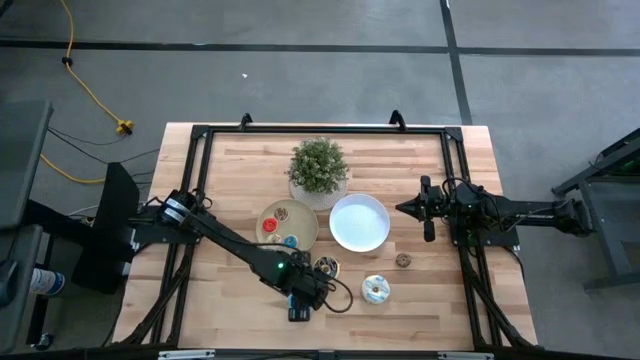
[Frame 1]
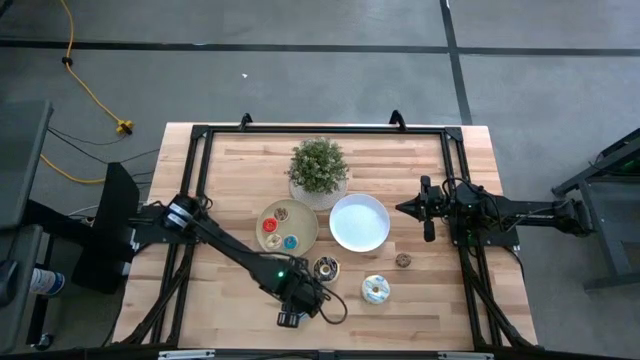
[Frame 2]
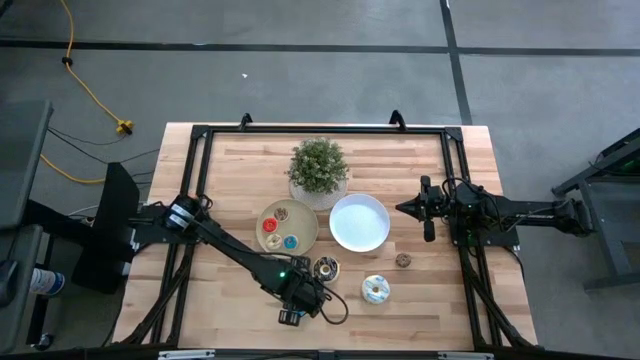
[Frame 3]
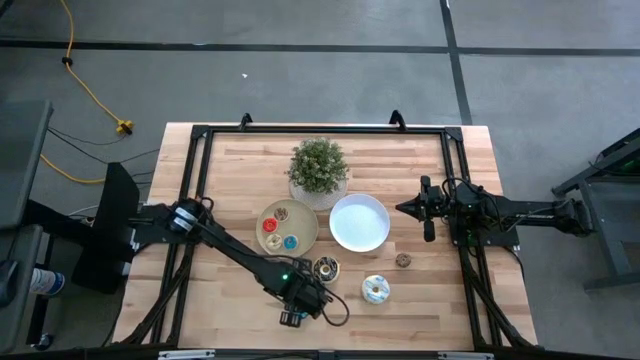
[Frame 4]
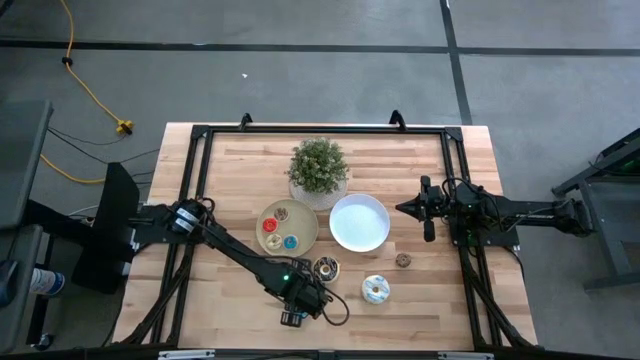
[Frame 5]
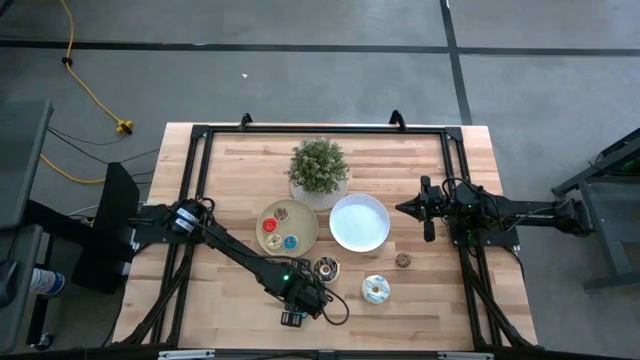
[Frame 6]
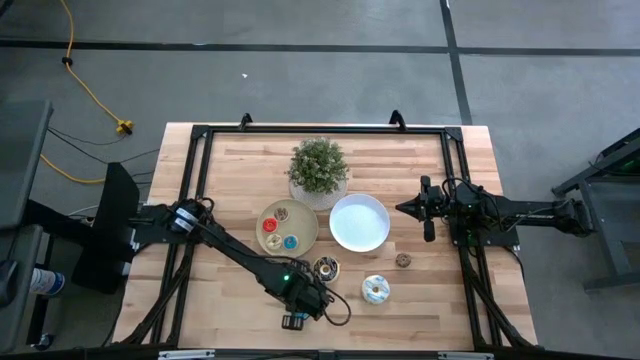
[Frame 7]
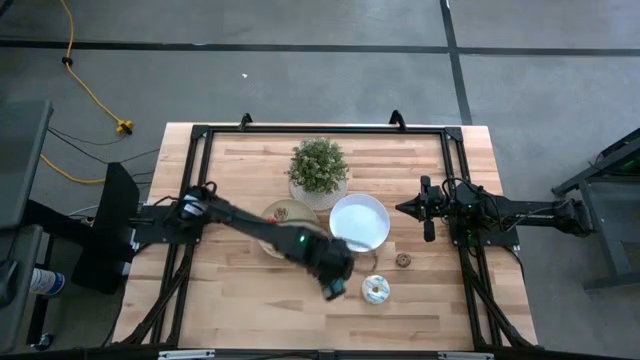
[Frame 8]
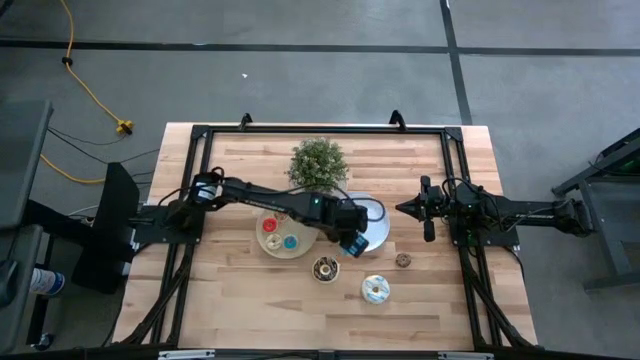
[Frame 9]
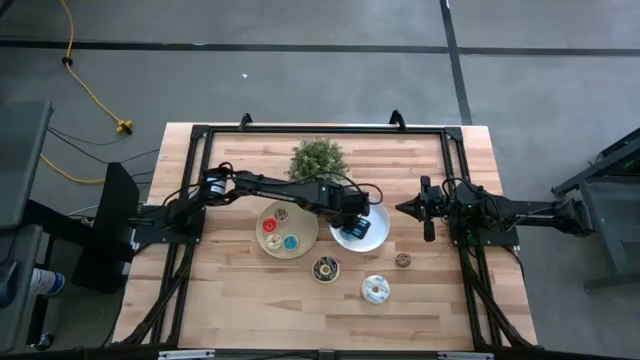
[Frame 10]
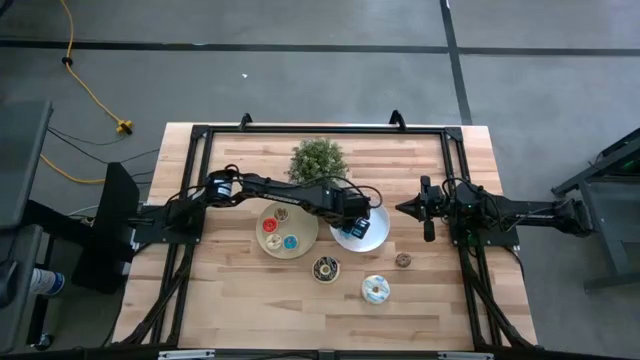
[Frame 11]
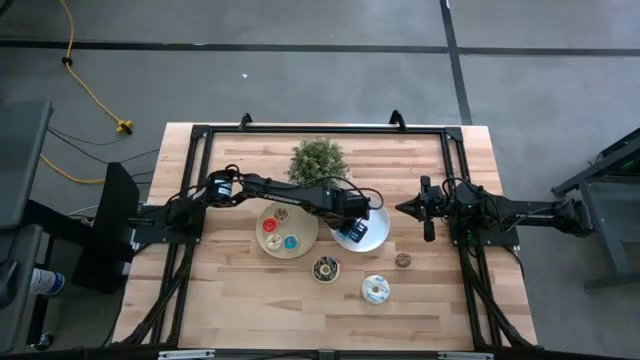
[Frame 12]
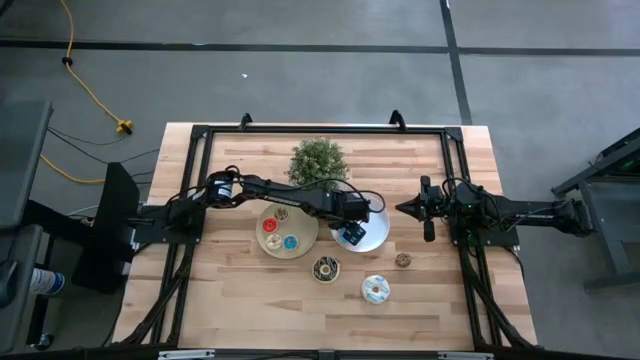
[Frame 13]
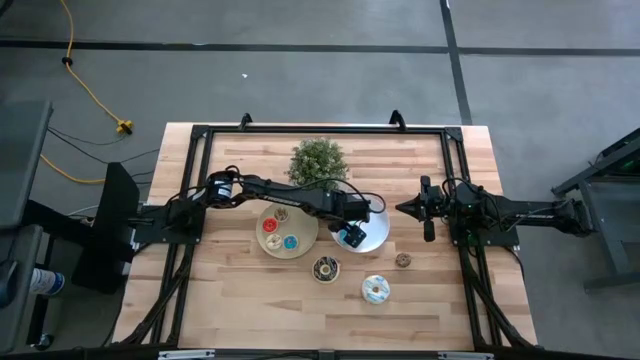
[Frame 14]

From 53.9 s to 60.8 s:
Task: Pick & Place donuts
Put the large blue donut on the white plate

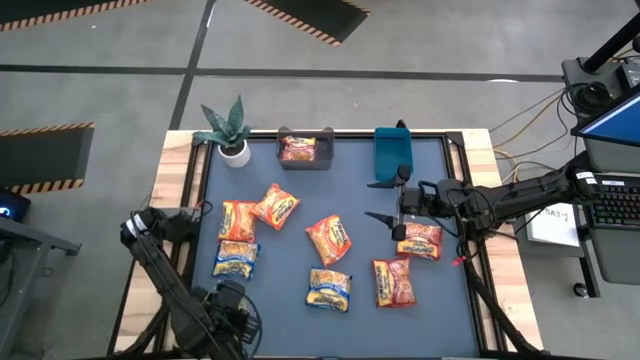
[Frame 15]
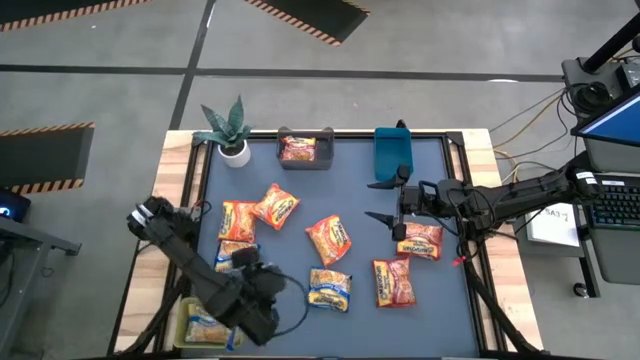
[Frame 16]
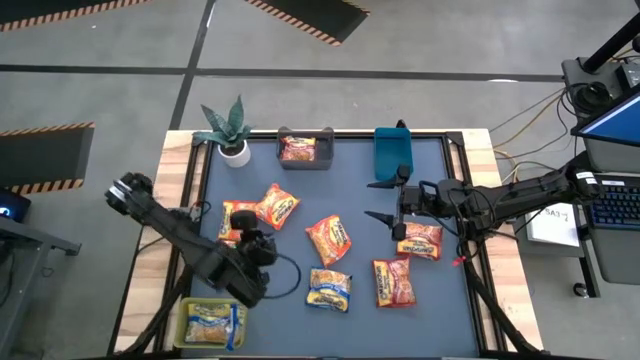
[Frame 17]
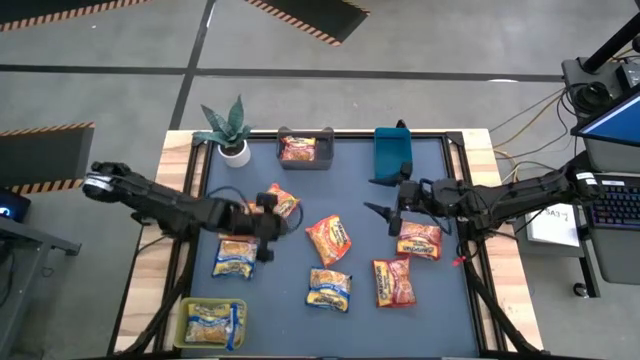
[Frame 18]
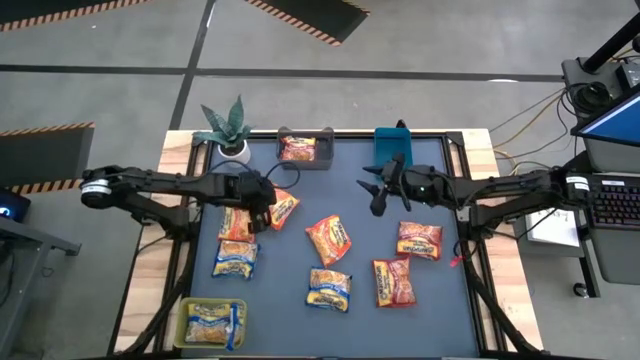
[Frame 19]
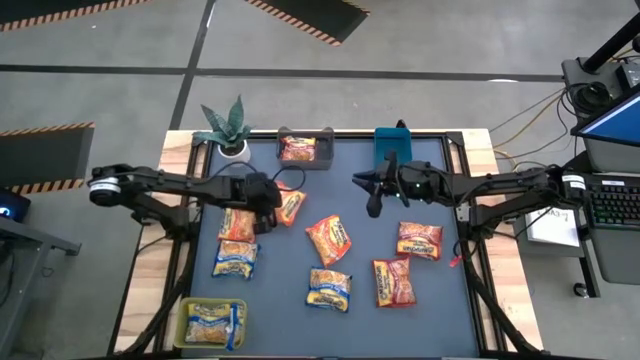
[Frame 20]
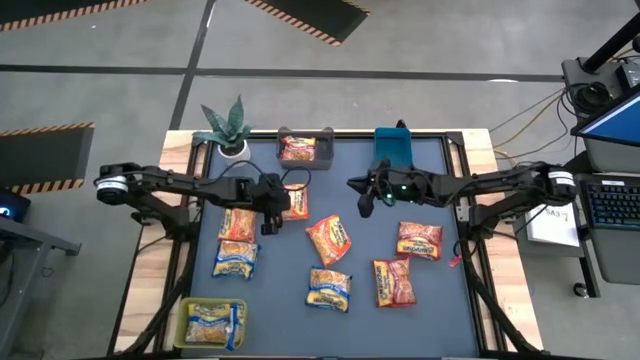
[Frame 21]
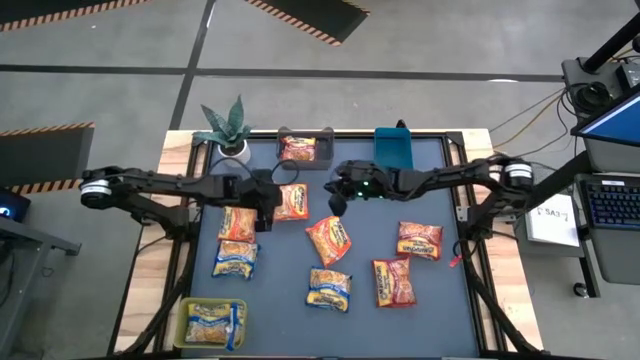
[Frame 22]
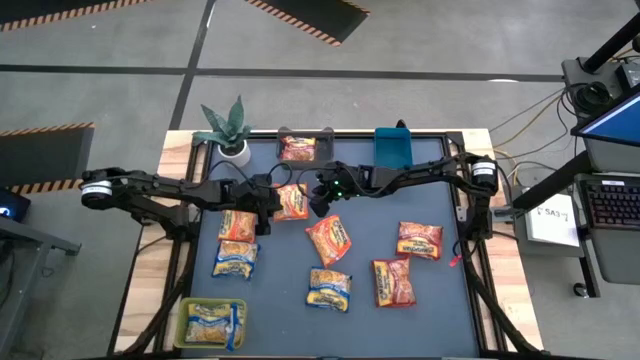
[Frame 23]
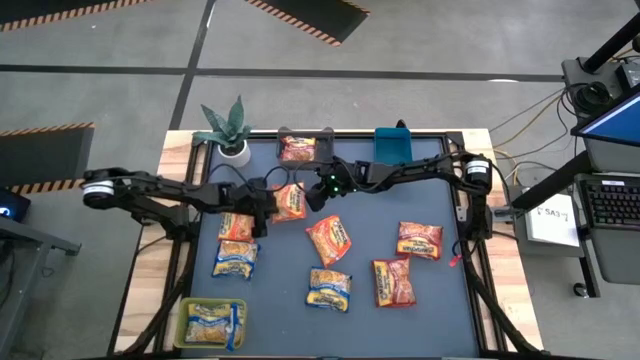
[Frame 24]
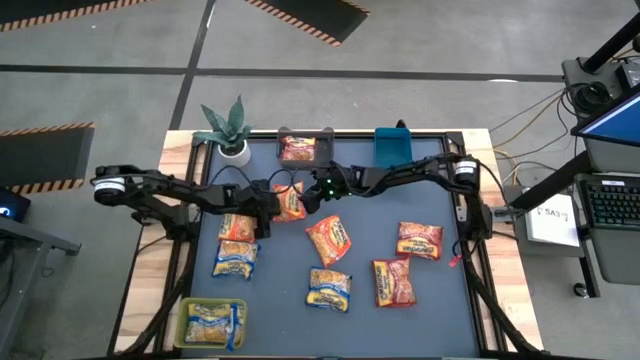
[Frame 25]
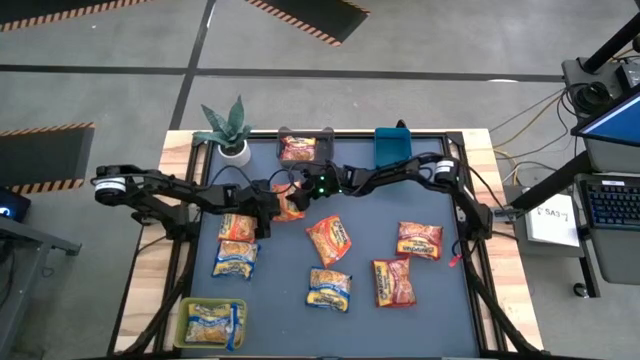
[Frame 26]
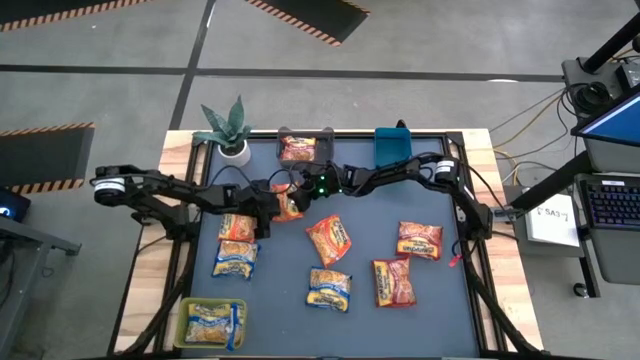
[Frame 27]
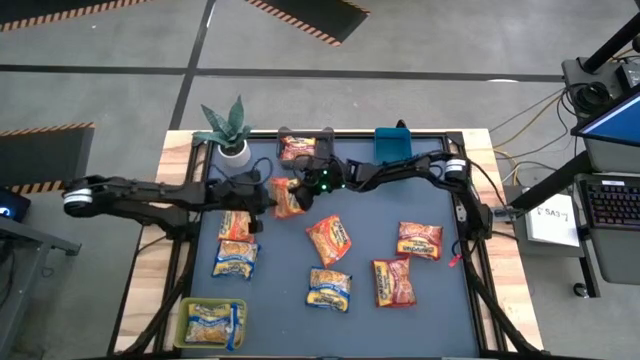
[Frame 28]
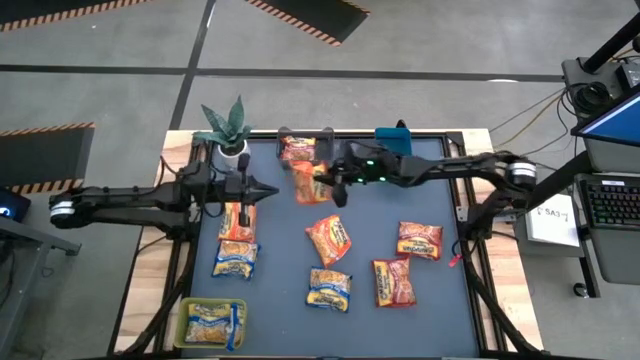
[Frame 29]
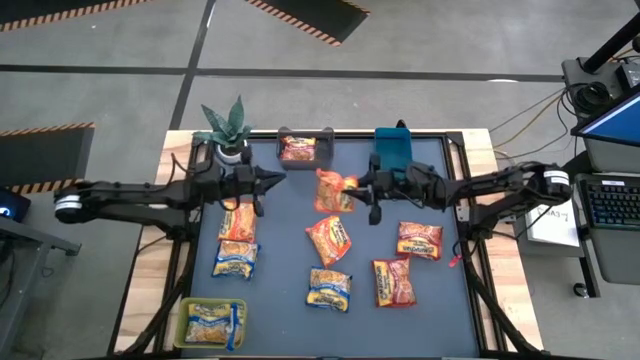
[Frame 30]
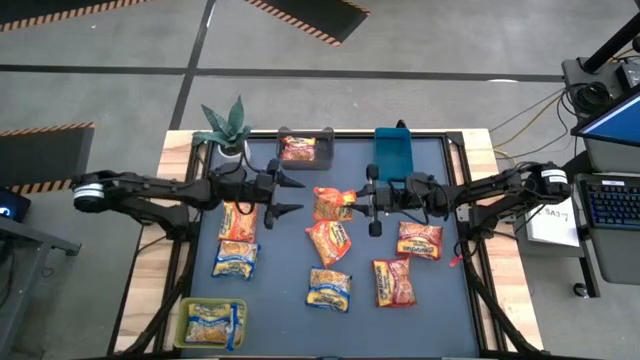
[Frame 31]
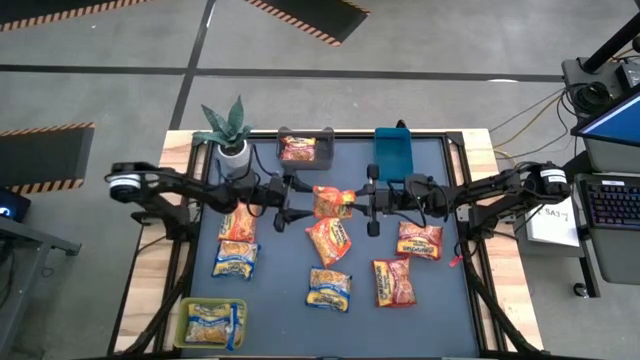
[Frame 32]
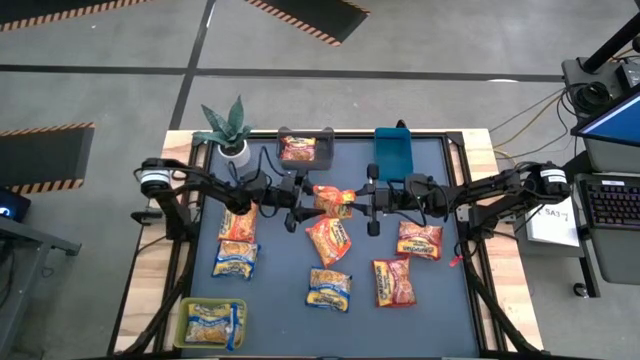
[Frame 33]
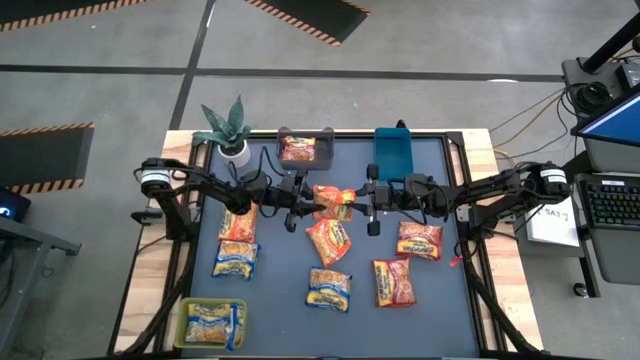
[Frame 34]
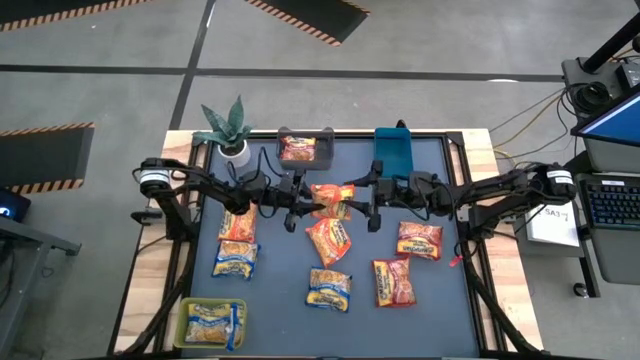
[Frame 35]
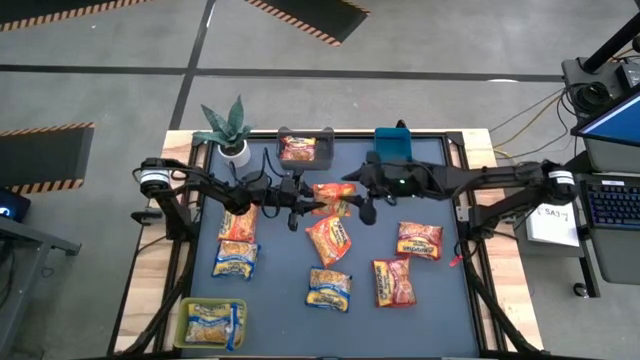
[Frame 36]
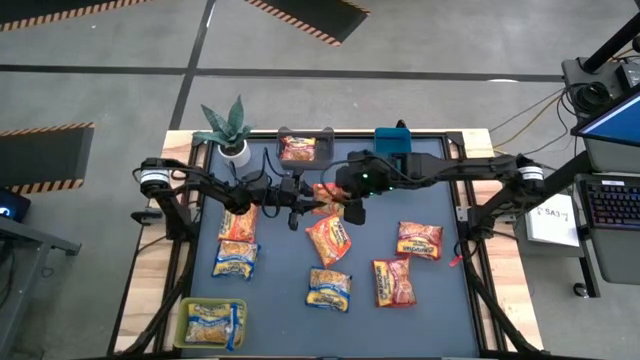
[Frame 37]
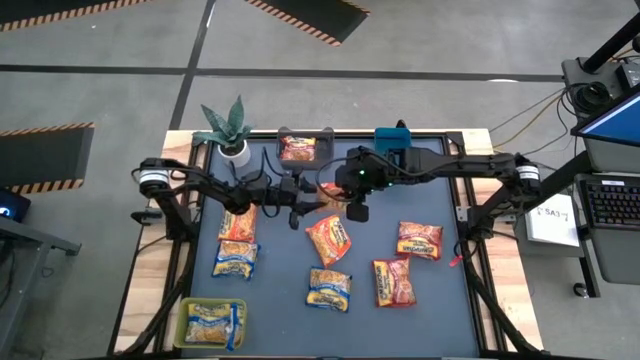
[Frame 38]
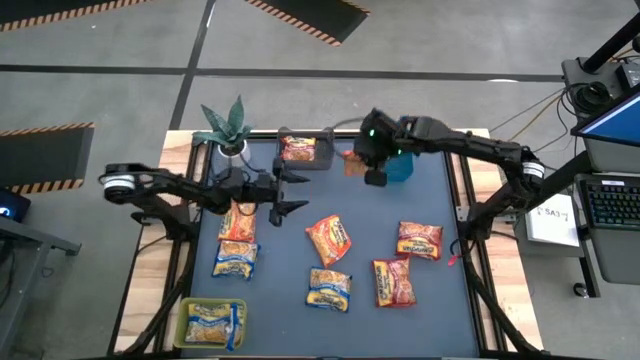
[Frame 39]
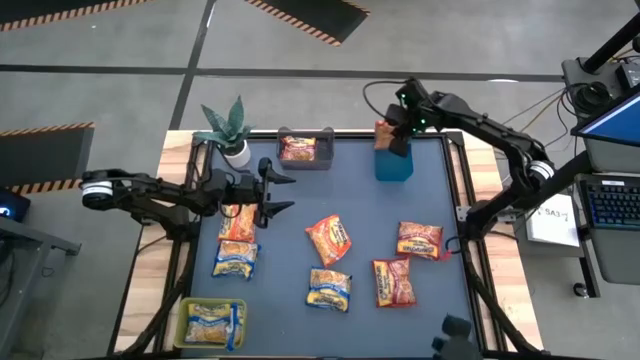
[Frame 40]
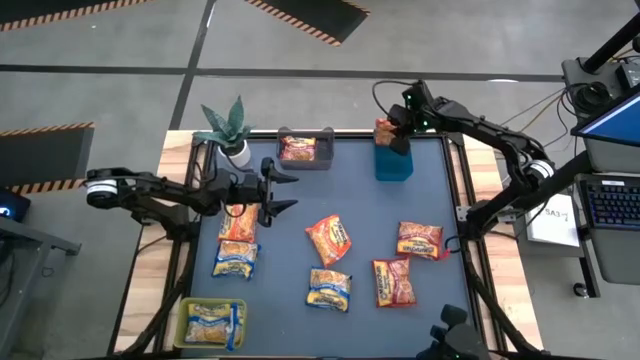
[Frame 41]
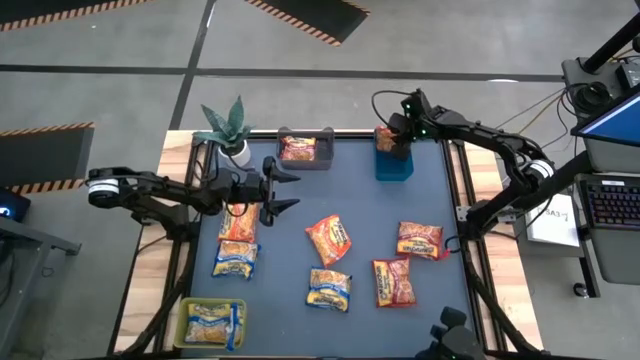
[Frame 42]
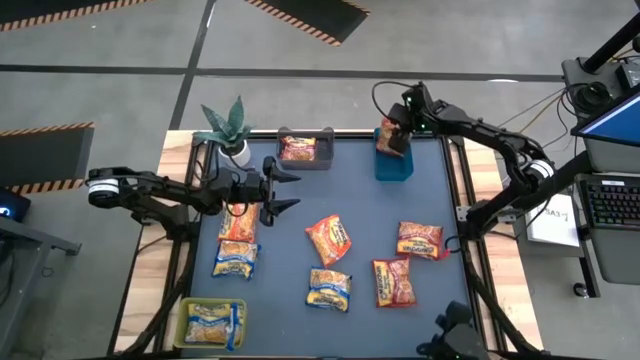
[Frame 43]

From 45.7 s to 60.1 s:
Task: Sort Maruchan noodles
Put the middle orange noodle pack into the blue bin

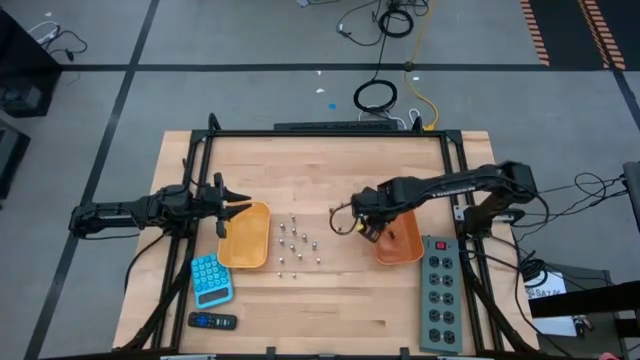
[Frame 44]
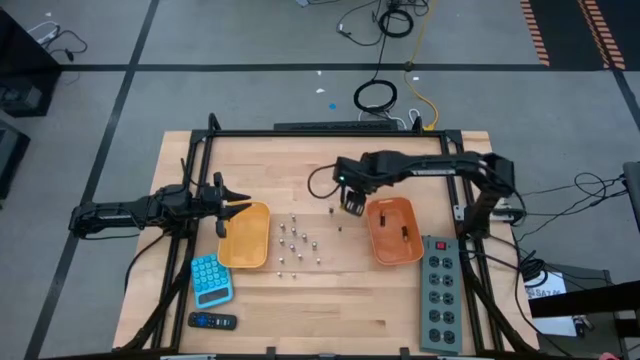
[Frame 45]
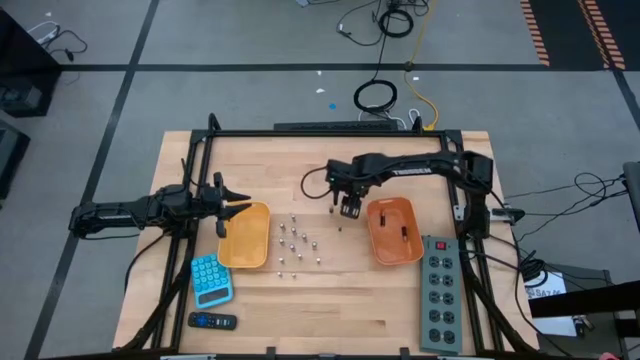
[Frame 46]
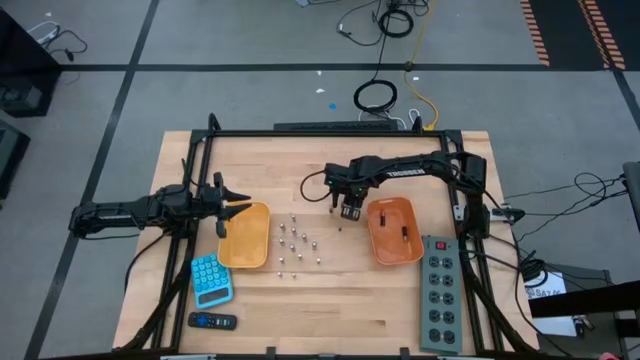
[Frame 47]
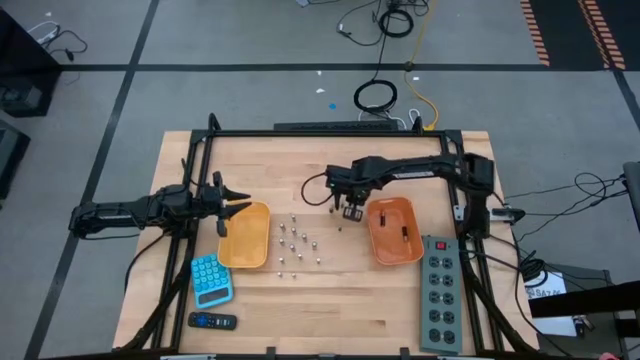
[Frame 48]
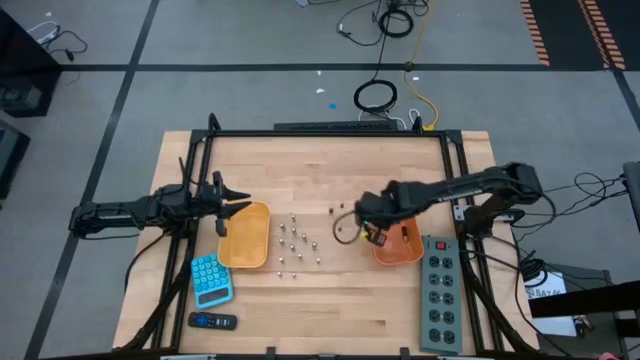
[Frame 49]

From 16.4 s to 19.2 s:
Task: Sort batteries
Put the black battery into the orange bin
